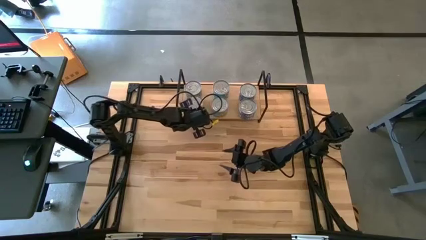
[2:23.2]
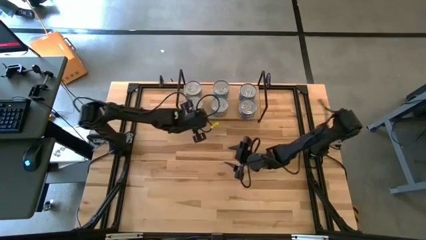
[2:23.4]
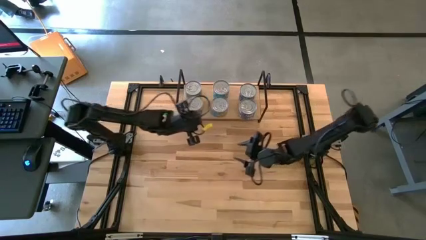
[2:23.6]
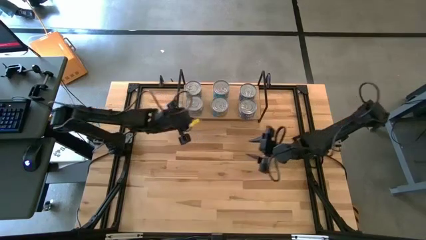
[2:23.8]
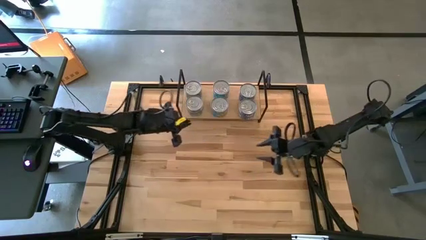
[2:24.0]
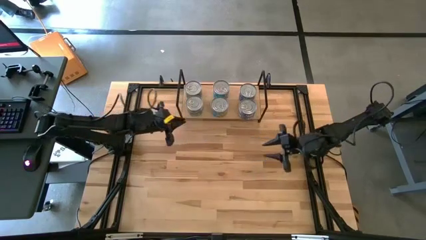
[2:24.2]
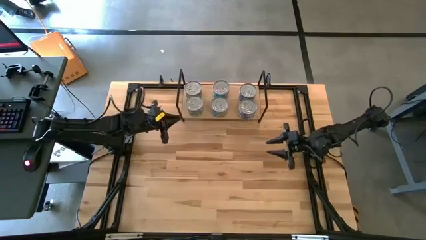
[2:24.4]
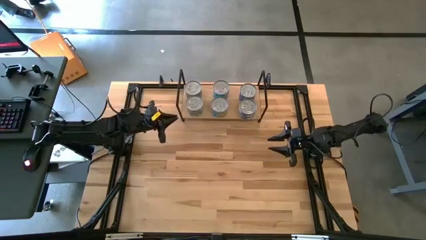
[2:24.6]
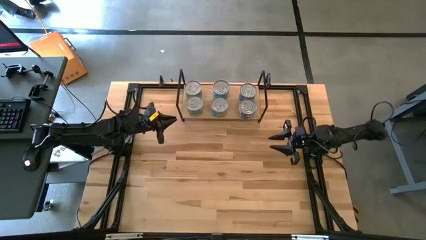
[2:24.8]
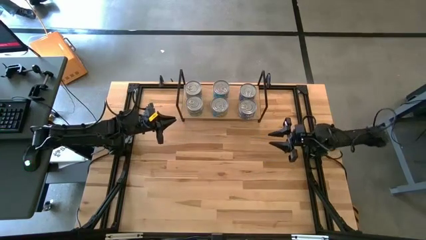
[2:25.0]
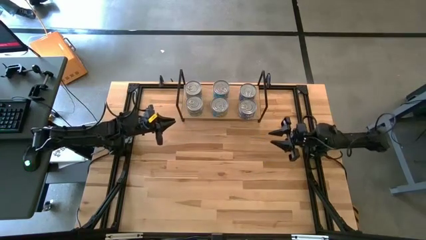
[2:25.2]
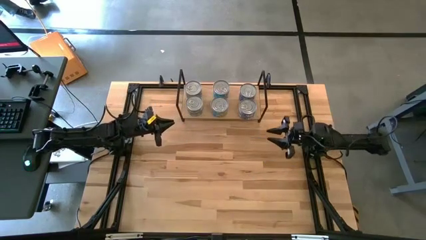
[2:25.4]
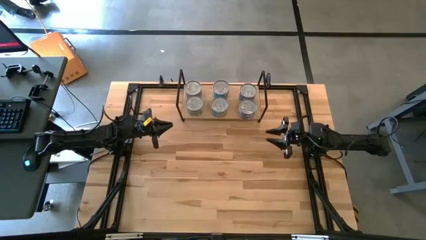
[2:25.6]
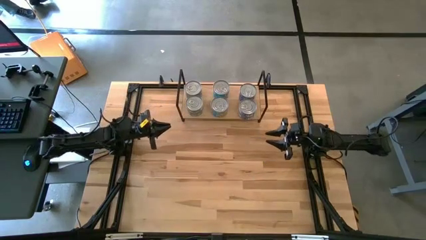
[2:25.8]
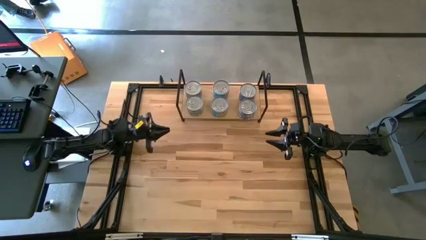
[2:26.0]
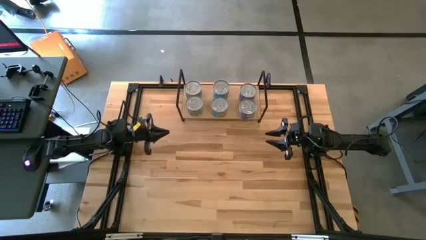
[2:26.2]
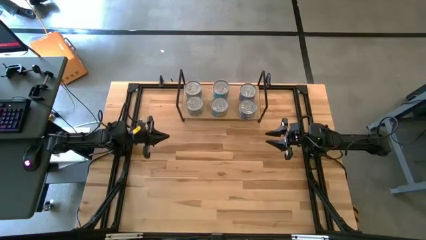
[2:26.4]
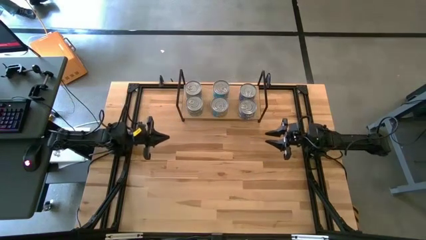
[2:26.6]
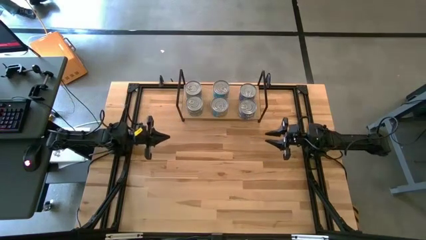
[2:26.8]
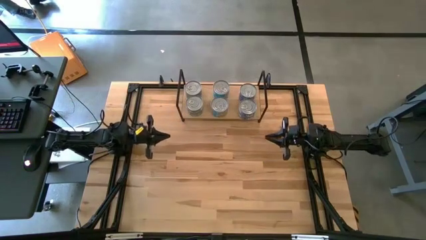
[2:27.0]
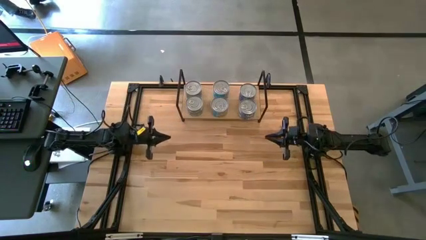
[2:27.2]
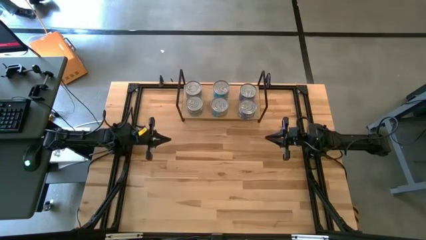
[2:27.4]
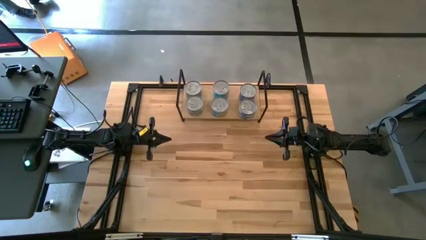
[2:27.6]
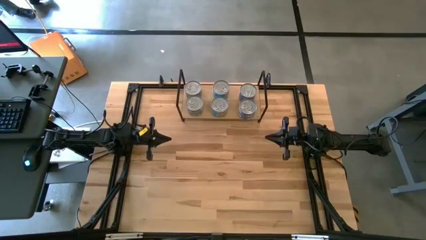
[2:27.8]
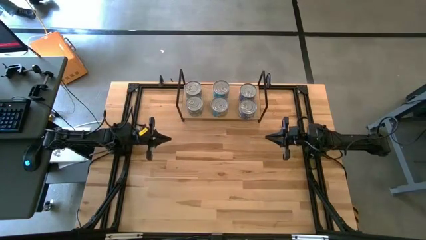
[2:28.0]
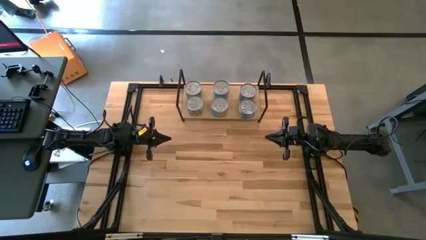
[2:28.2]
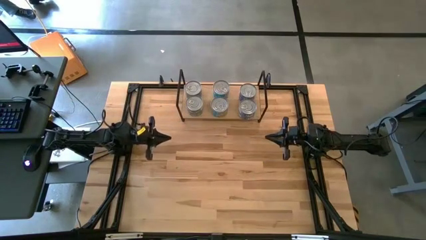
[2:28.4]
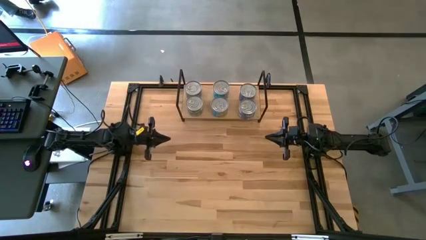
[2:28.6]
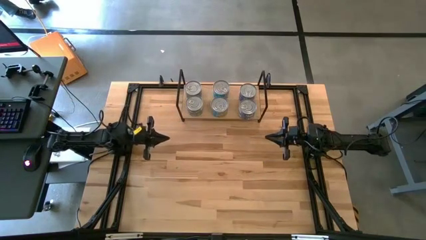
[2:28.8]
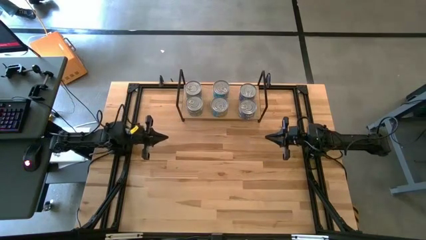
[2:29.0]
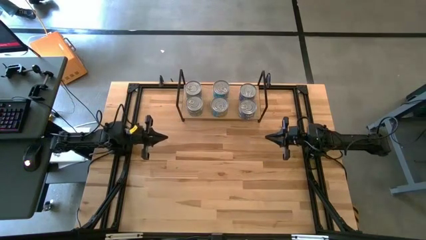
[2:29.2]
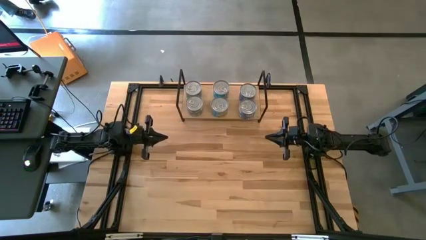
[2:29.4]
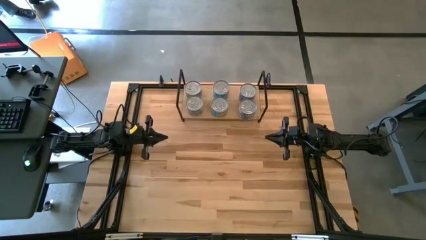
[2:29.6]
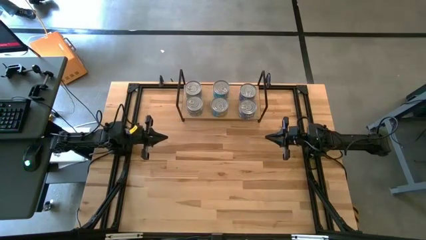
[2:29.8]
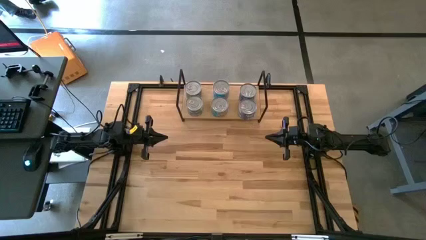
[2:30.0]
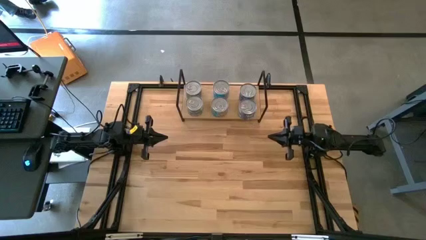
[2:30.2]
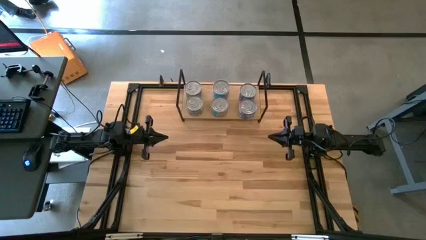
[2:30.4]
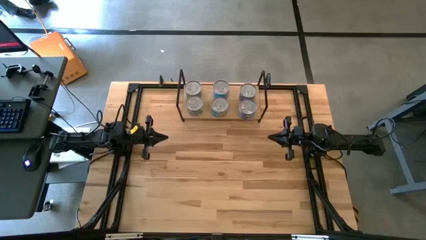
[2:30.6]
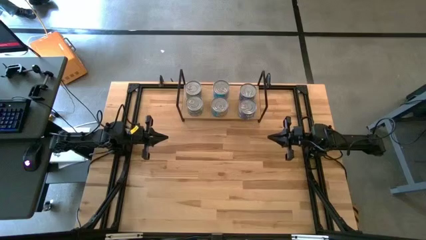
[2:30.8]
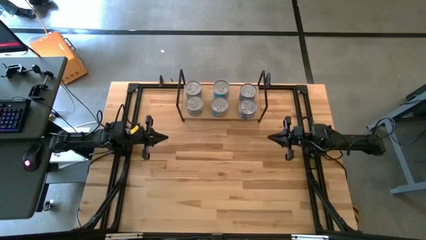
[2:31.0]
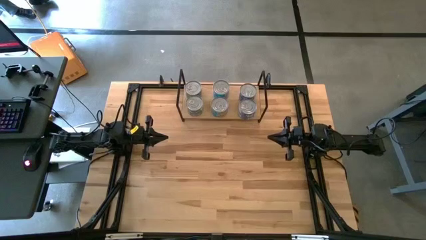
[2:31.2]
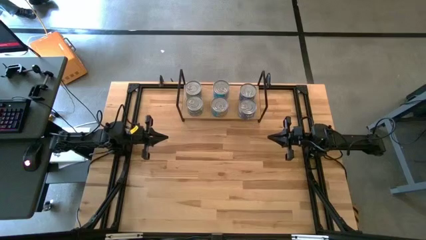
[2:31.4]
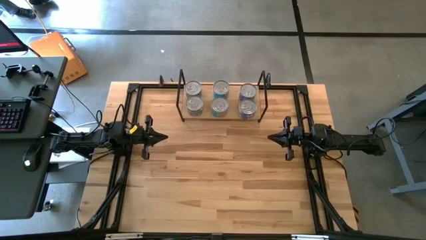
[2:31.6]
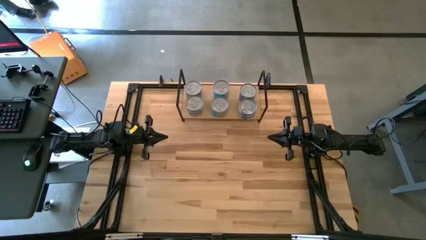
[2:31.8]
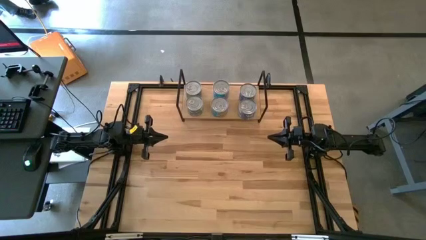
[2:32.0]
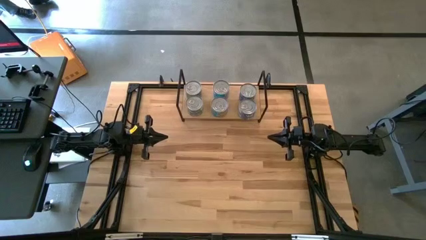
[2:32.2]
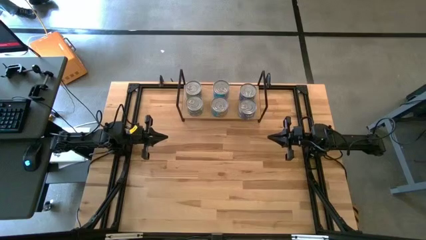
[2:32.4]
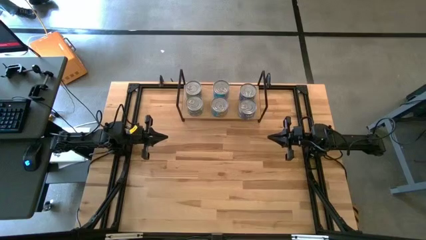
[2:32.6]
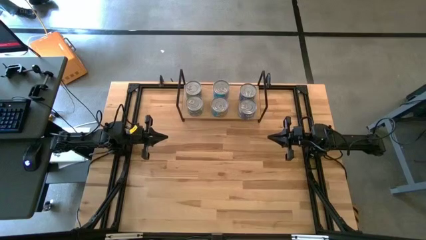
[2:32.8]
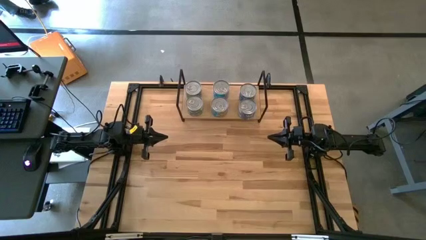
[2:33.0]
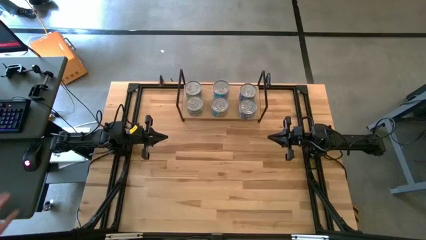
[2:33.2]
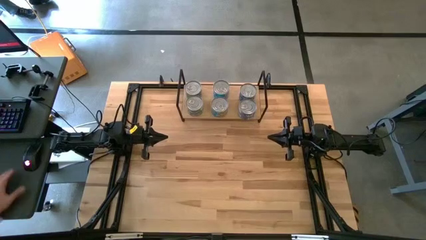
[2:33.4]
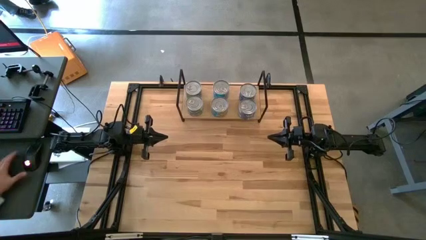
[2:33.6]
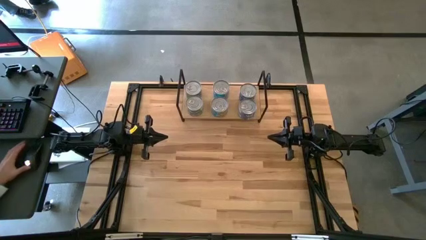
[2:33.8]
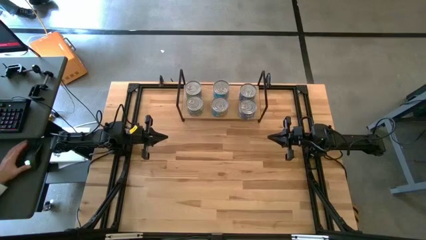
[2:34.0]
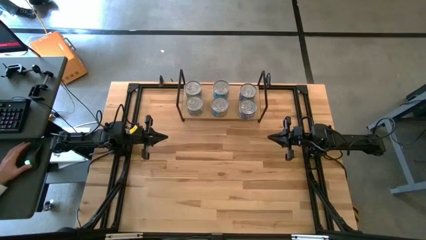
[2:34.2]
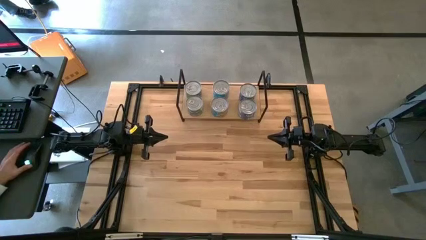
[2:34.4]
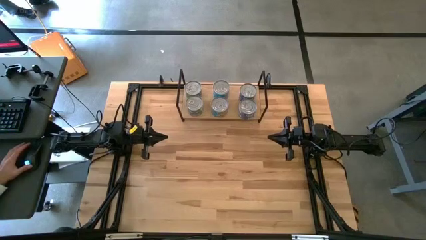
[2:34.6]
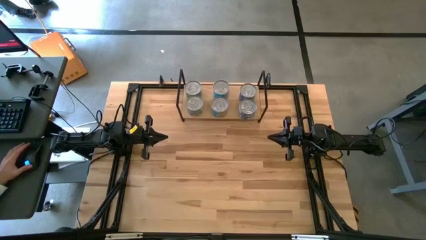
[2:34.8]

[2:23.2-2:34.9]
Task: Stack canned seafood by type on shelf
Return to Home Position
